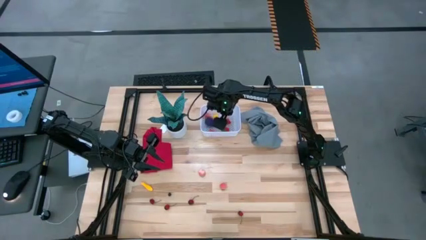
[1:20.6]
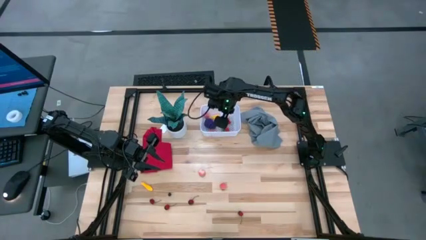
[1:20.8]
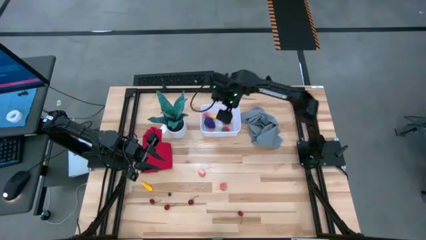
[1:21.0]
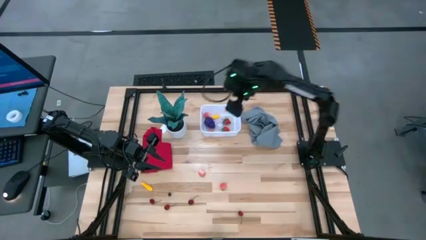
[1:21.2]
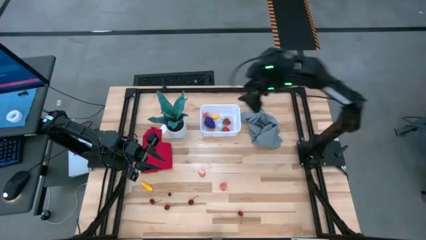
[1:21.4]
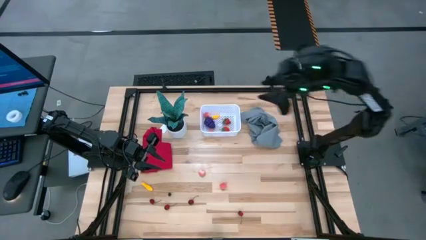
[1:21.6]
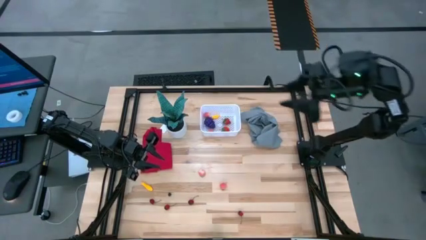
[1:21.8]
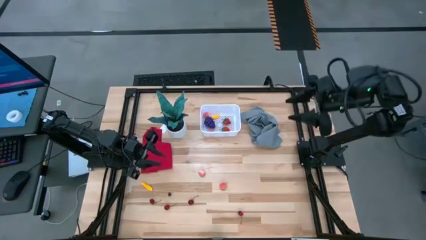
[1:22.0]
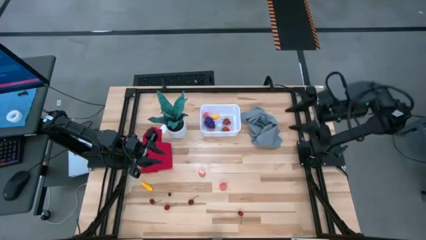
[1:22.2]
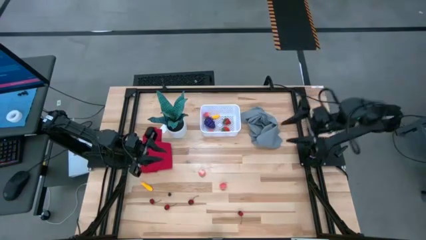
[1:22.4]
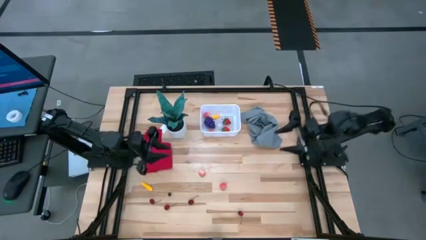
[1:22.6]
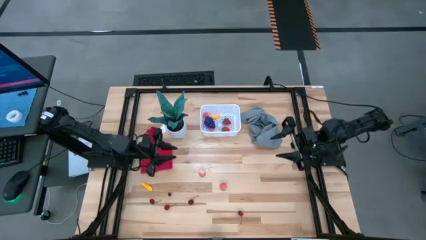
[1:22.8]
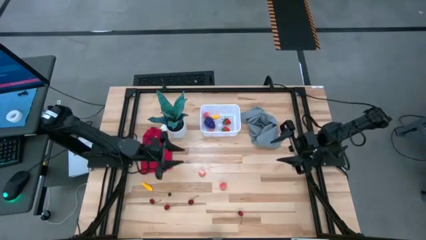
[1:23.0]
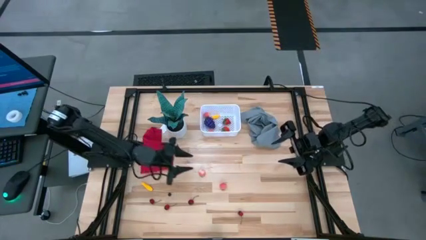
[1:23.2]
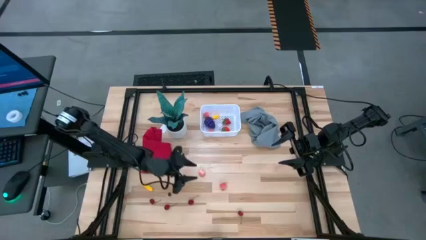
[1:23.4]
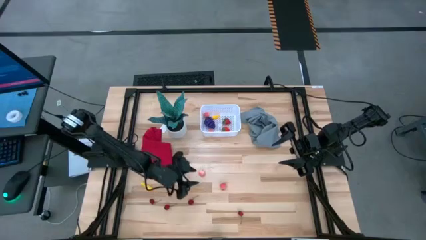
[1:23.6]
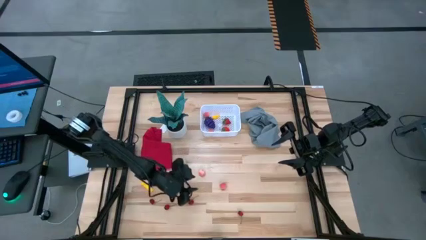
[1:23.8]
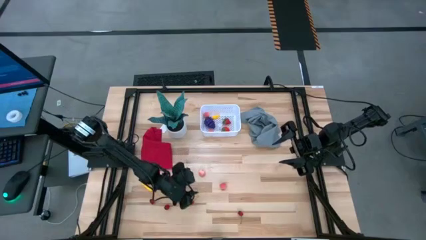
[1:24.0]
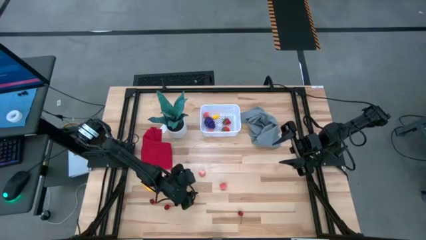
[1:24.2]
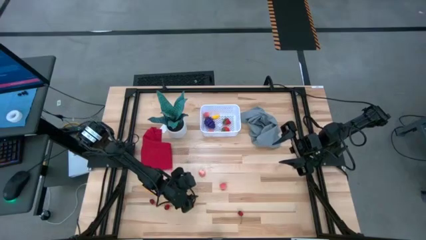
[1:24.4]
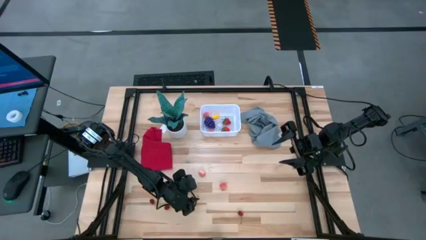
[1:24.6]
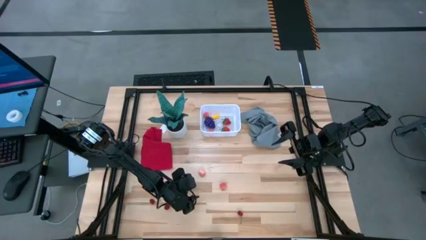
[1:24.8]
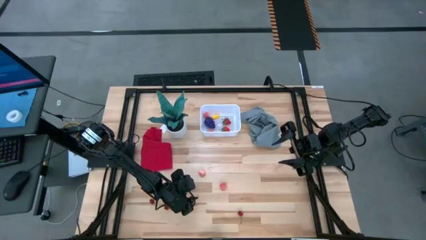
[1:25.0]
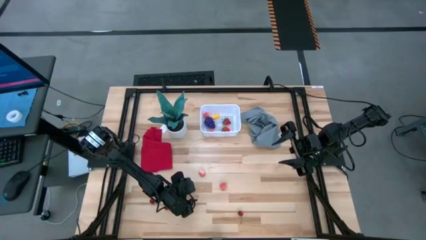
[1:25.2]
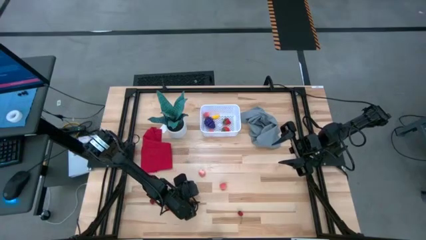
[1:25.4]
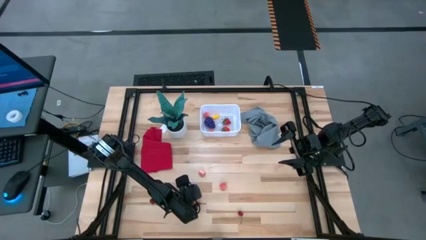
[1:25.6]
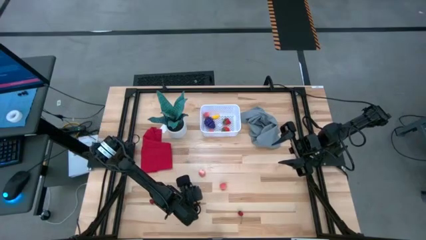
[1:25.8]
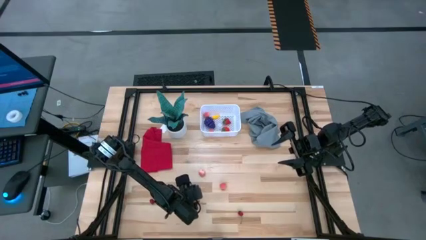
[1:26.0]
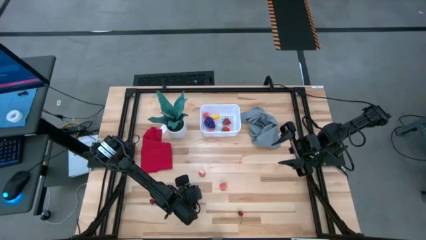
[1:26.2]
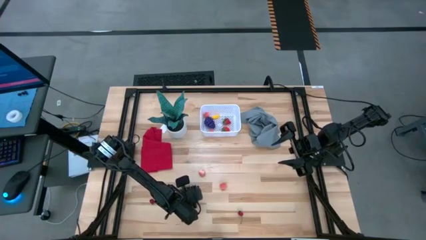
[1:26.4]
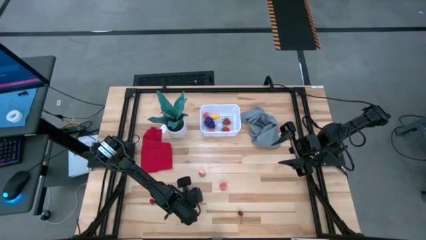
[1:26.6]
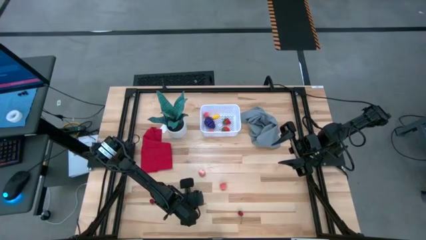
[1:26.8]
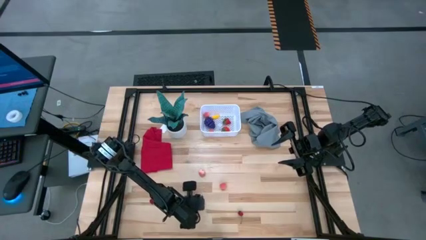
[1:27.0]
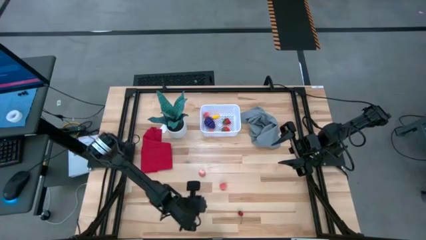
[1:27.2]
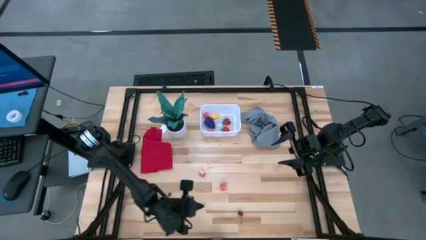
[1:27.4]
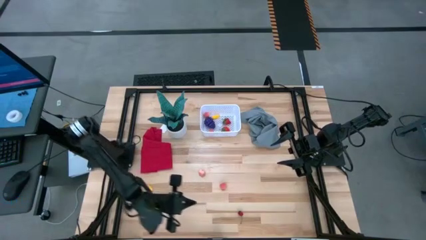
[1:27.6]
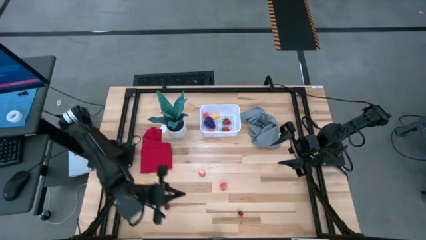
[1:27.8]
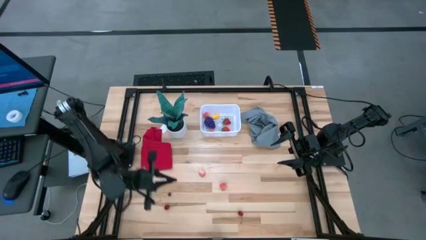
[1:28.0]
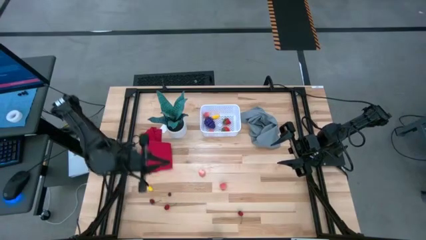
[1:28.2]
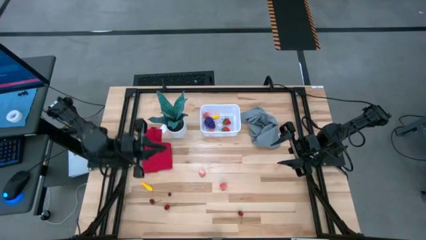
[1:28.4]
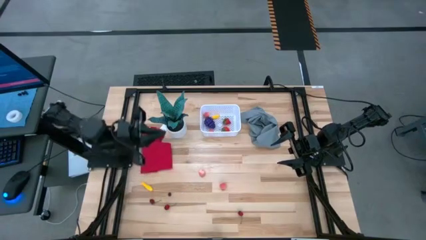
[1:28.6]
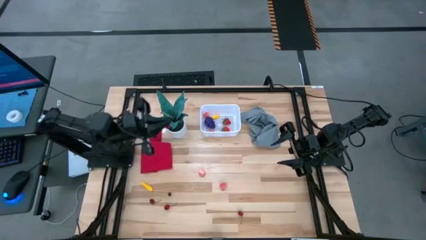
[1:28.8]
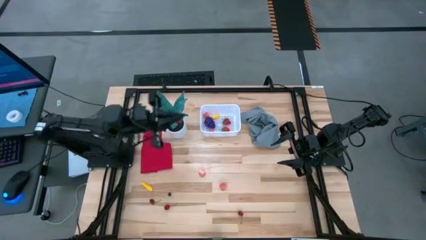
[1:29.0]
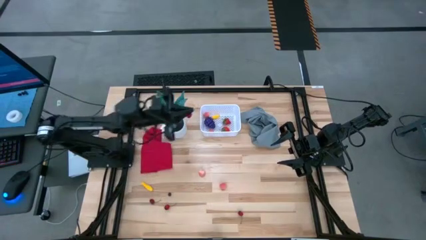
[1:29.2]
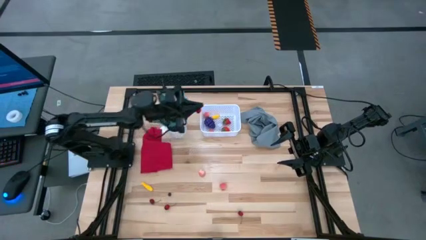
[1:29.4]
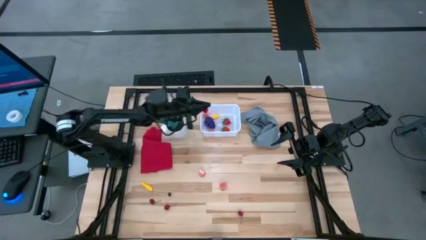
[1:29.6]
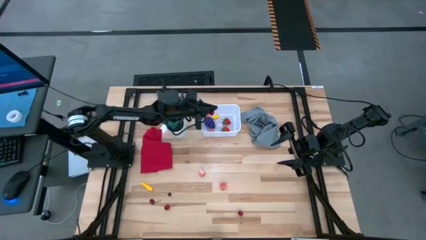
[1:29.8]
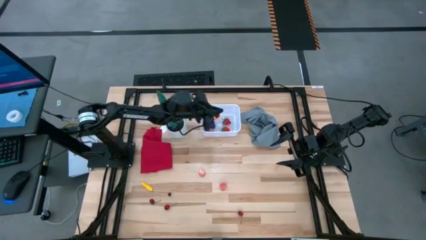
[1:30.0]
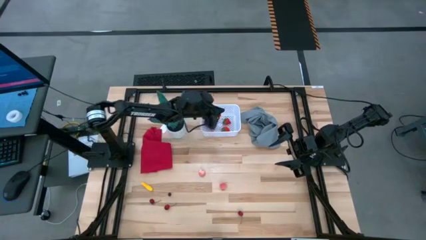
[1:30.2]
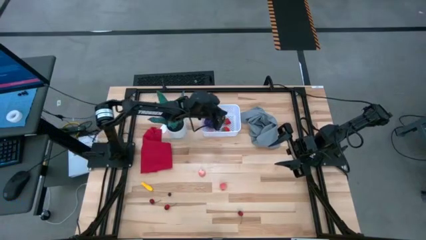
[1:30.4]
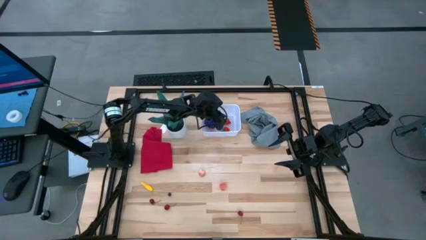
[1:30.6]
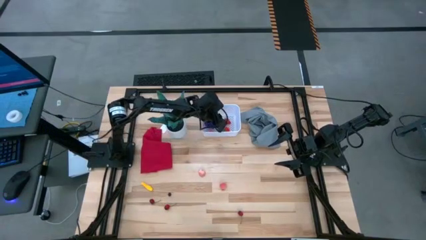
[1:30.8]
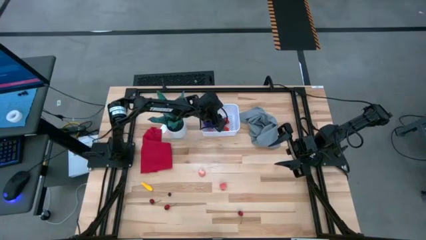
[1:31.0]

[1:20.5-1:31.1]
Task: Pick and placing Produce into tupperware
Put the red cherry into the white bin

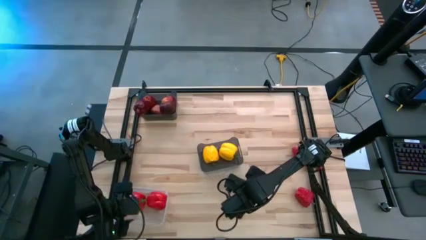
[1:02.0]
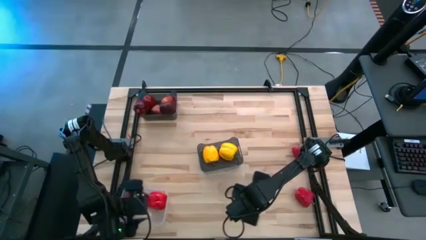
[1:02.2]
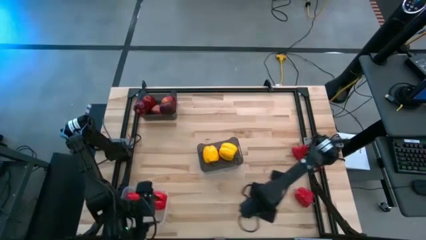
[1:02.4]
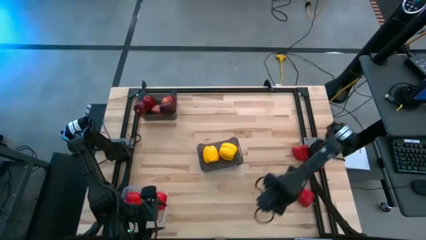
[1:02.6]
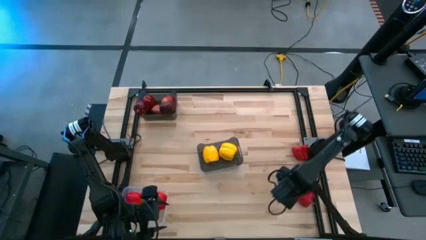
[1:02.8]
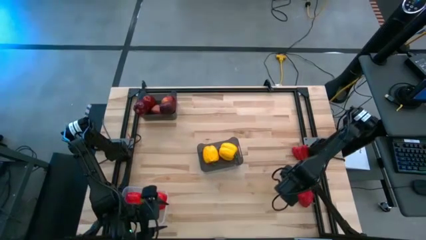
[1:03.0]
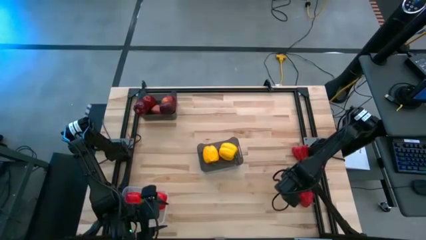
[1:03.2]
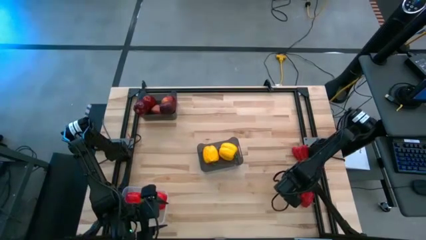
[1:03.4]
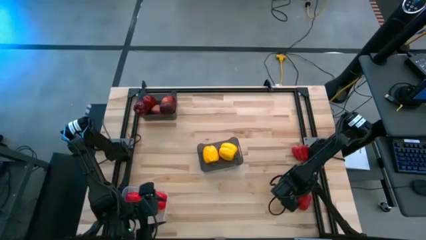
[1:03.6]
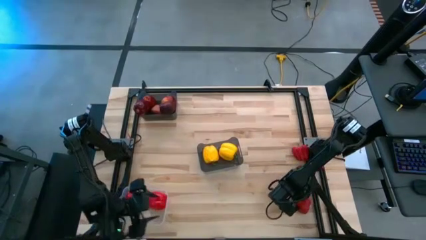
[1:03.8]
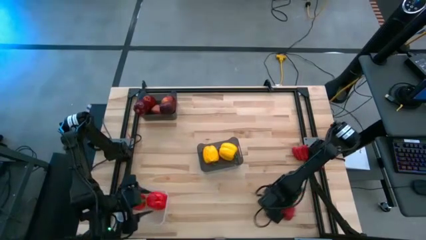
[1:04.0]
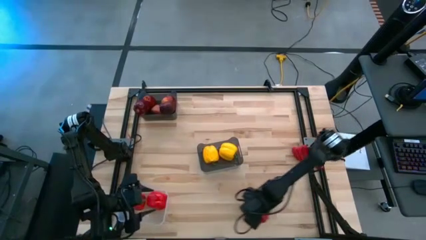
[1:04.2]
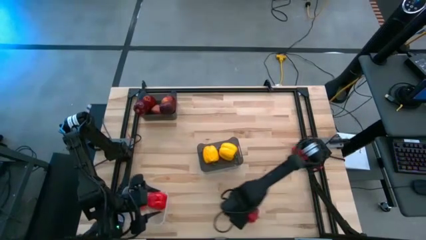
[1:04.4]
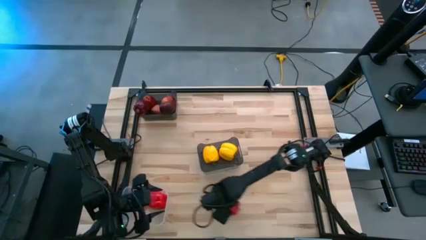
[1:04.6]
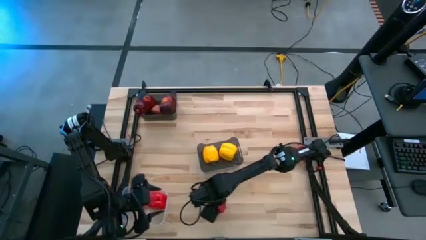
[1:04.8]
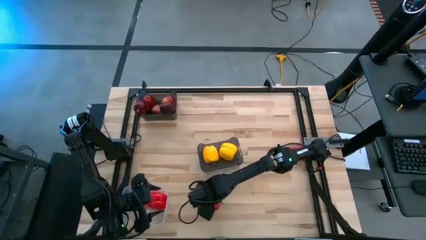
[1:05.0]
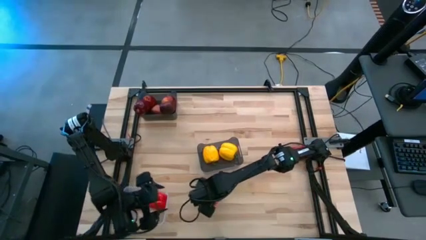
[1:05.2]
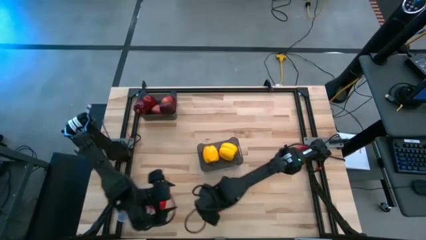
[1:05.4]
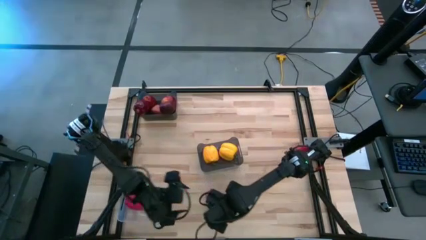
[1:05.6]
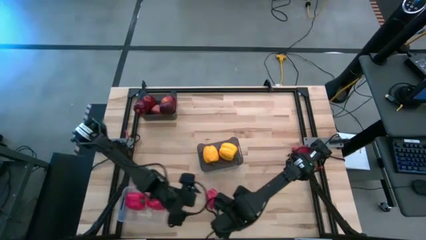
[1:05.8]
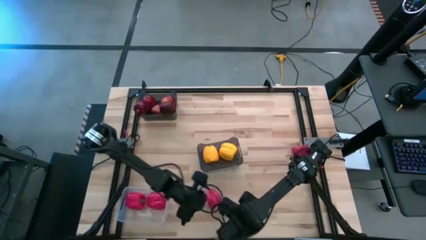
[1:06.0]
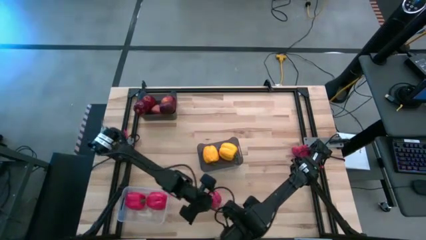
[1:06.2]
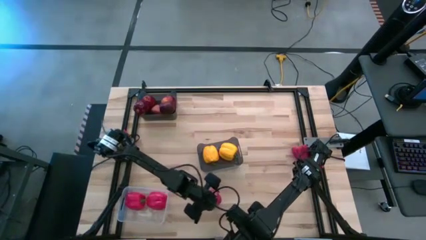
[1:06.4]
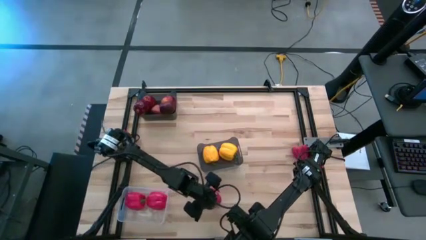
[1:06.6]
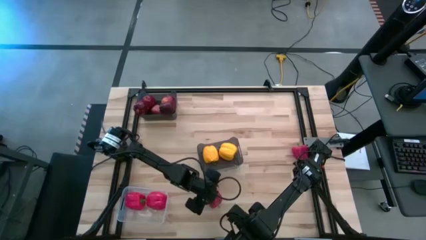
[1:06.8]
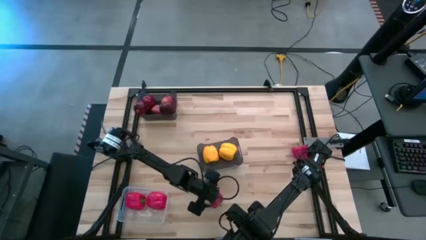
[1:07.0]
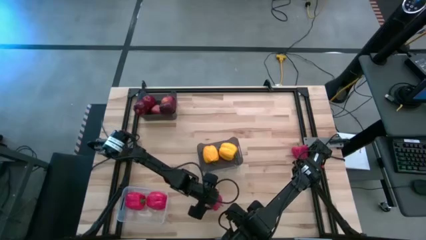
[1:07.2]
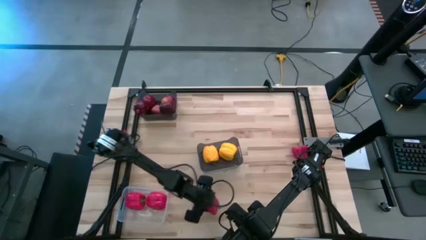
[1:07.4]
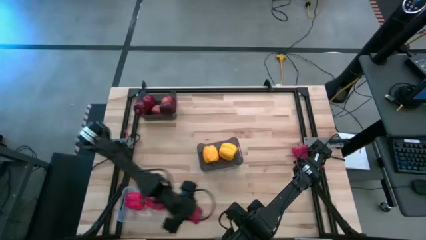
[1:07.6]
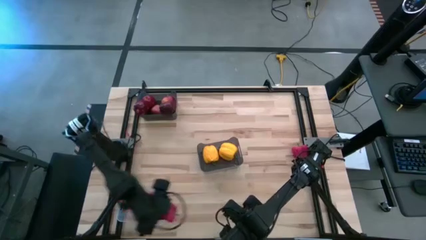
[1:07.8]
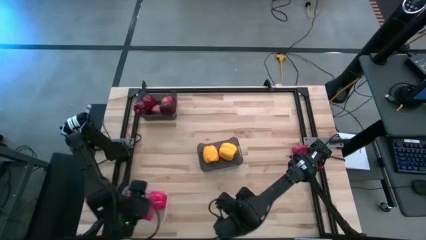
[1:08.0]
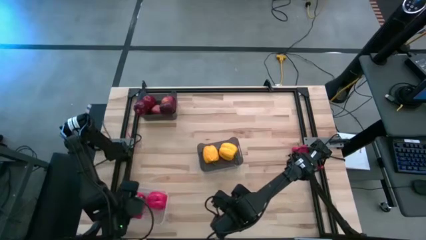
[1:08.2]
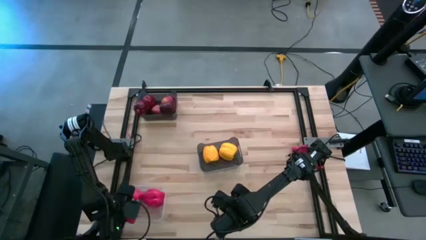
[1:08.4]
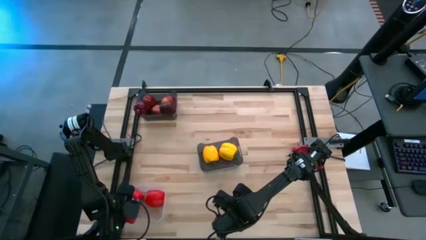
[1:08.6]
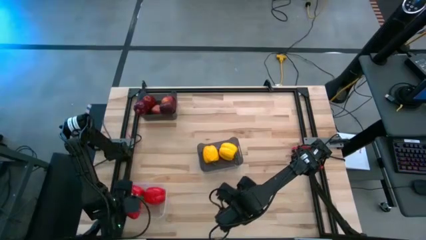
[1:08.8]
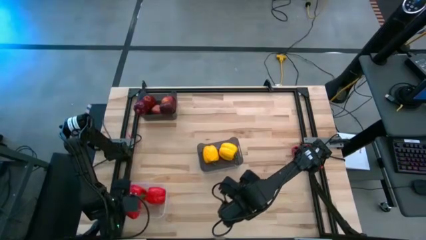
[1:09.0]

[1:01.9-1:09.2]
Task: Sort produce into baskets
Put the bottom red bell pepper into the transparent bin
